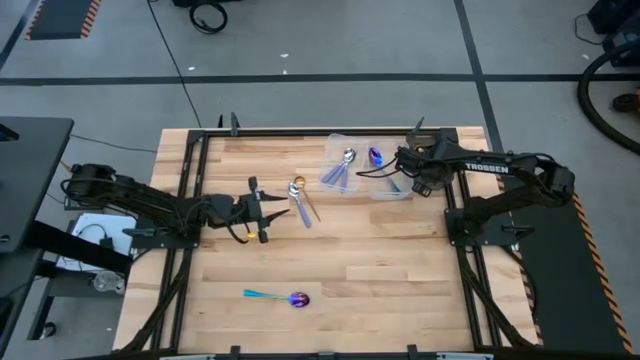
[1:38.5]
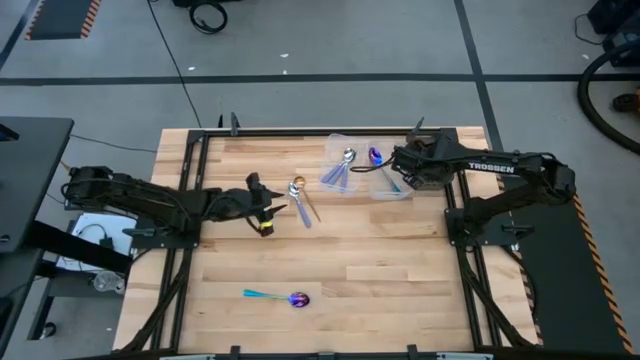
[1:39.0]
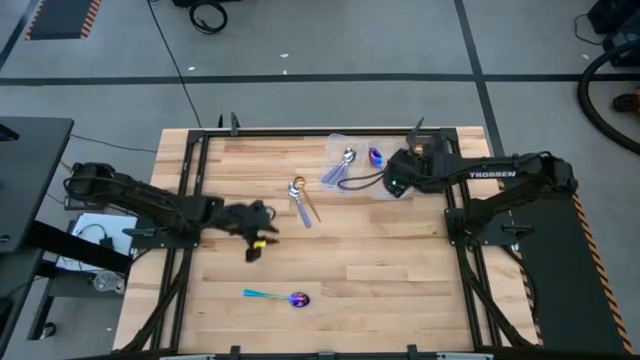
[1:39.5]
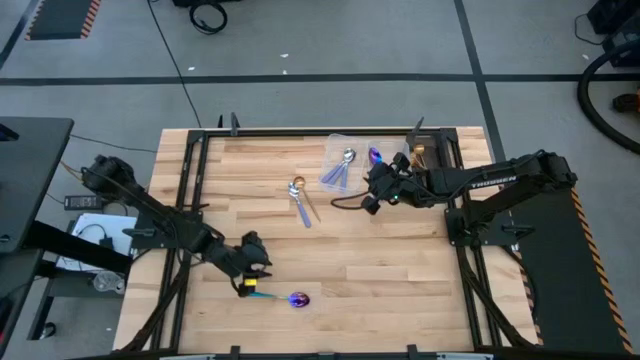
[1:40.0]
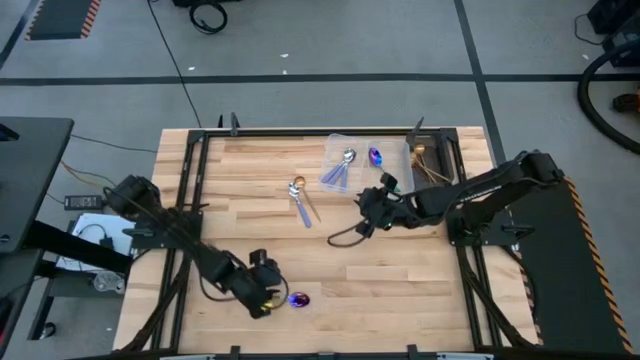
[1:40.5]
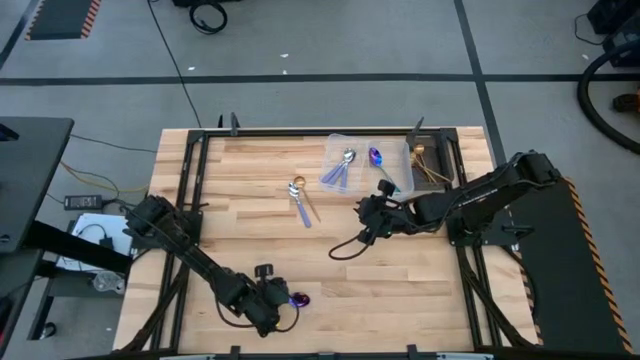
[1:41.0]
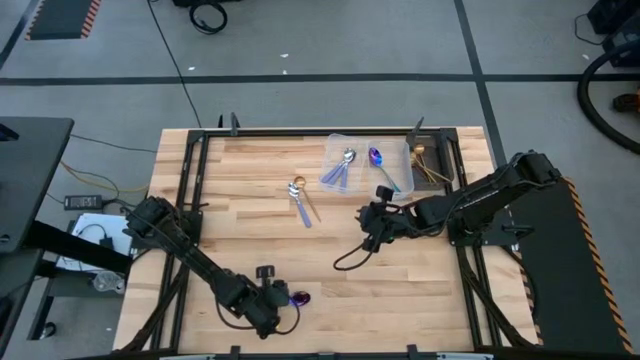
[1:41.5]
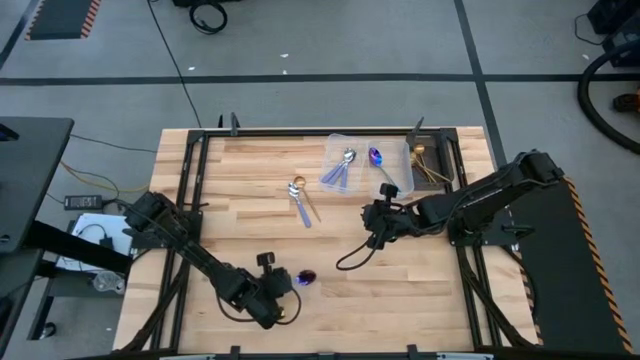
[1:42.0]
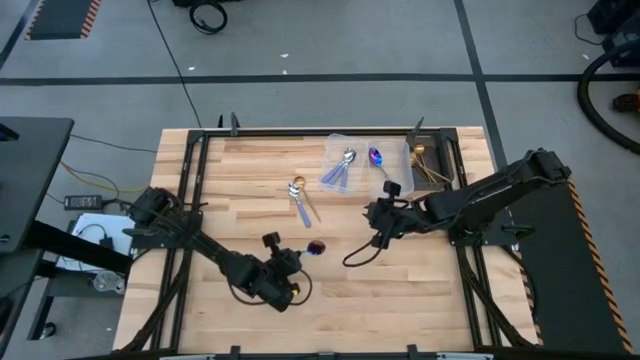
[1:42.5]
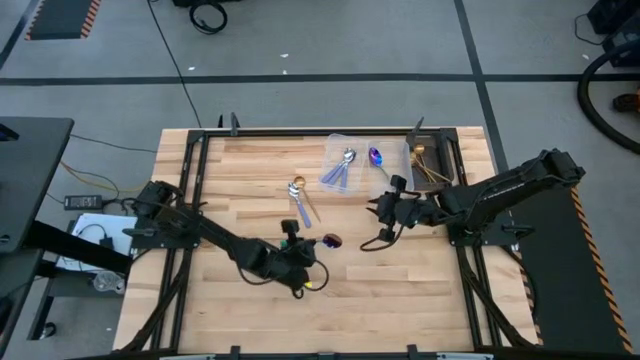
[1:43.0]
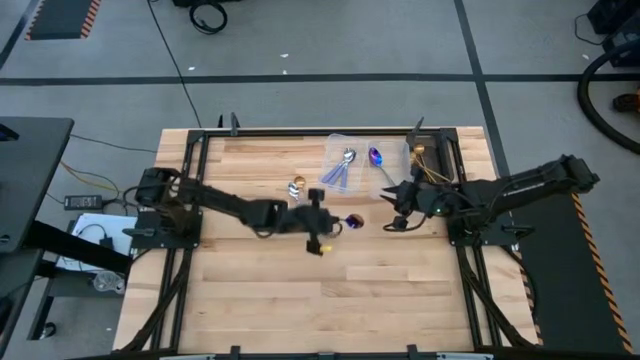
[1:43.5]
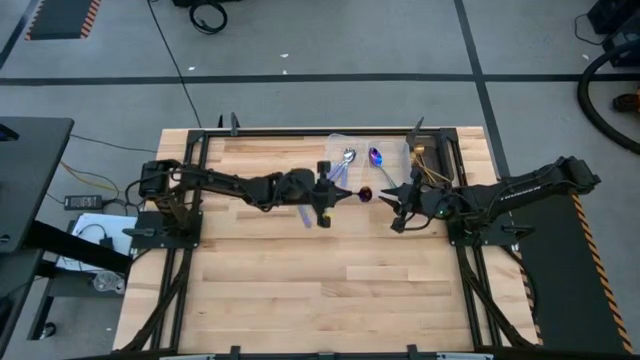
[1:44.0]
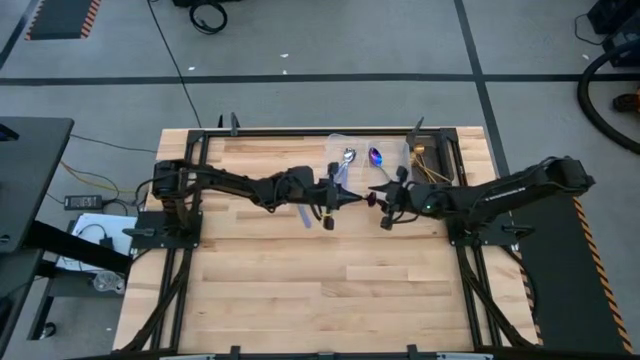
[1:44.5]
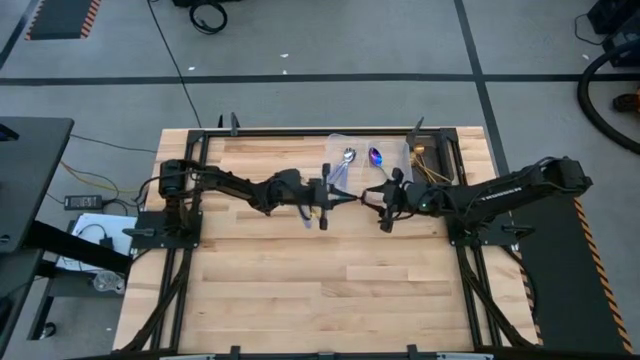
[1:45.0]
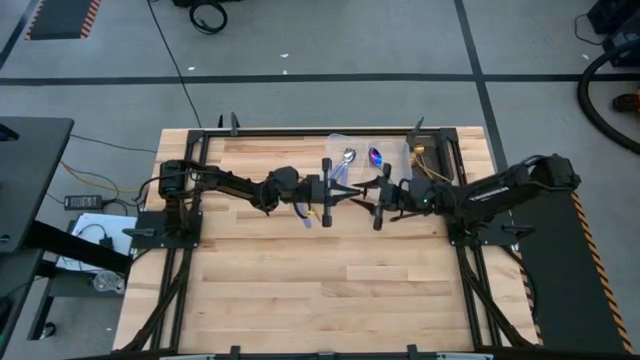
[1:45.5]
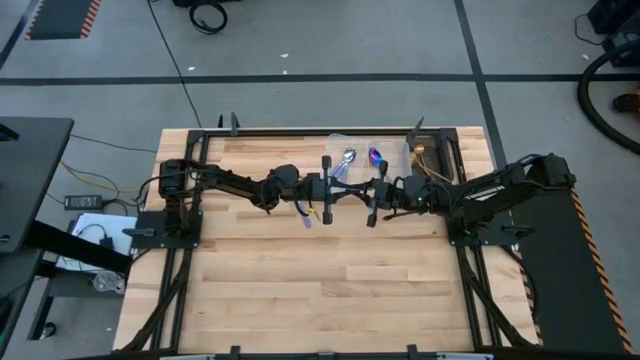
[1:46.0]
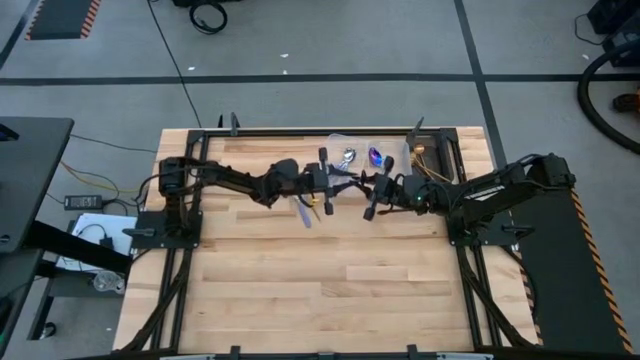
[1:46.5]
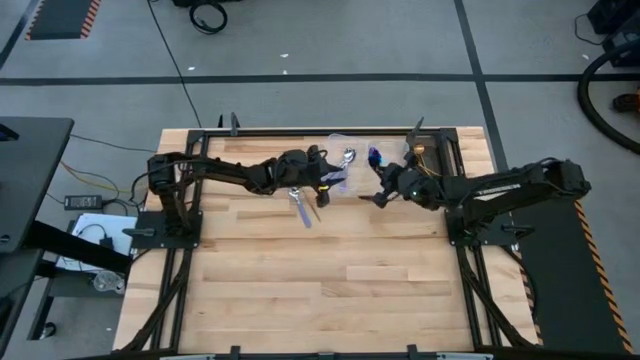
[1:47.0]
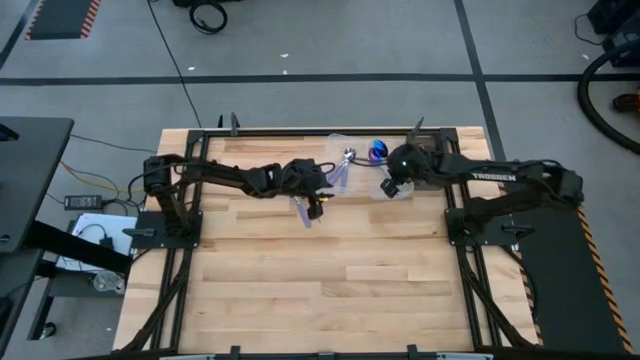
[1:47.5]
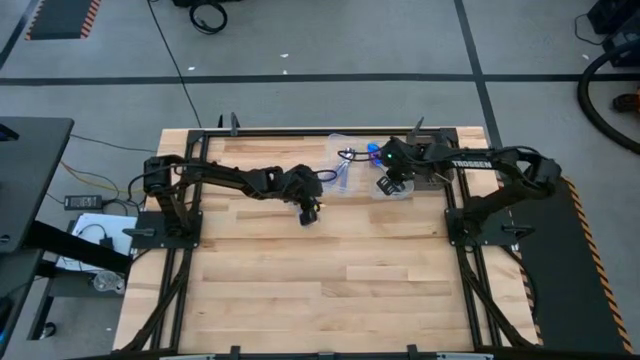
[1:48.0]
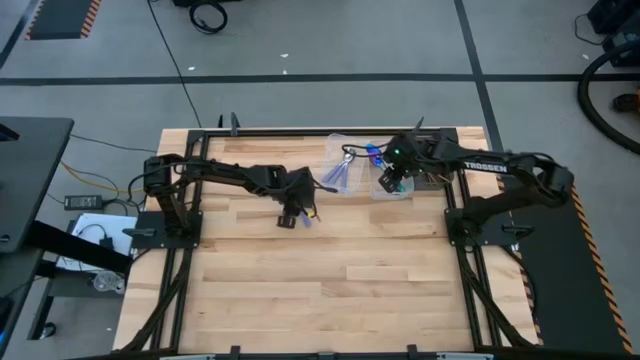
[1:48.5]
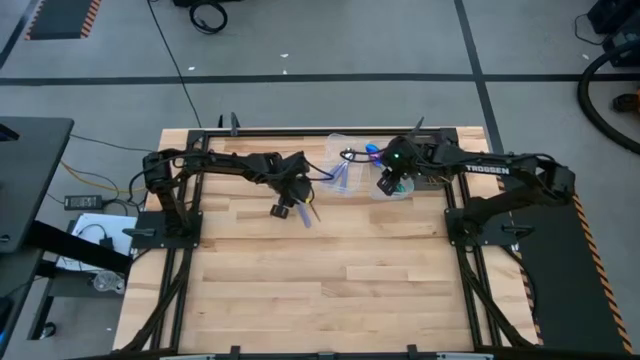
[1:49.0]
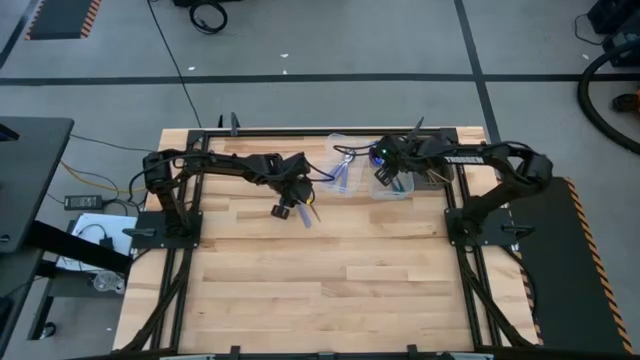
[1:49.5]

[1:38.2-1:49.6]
Task: Sort silverware by color (type)
Put the purple spoon into the right transparent bin

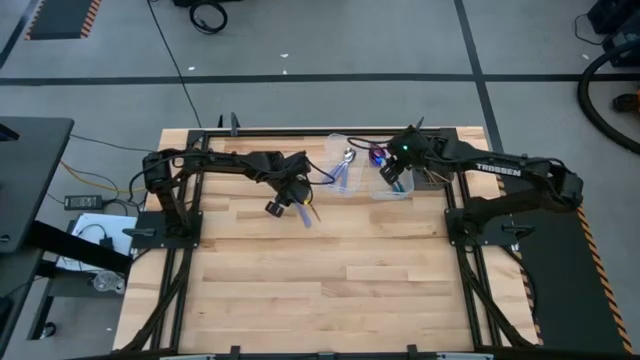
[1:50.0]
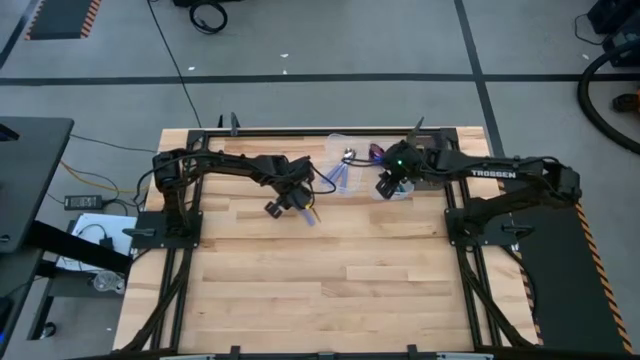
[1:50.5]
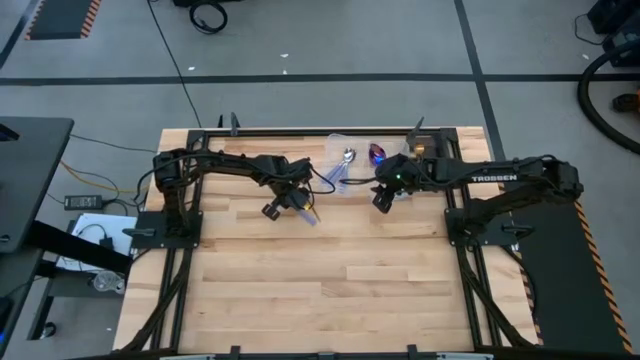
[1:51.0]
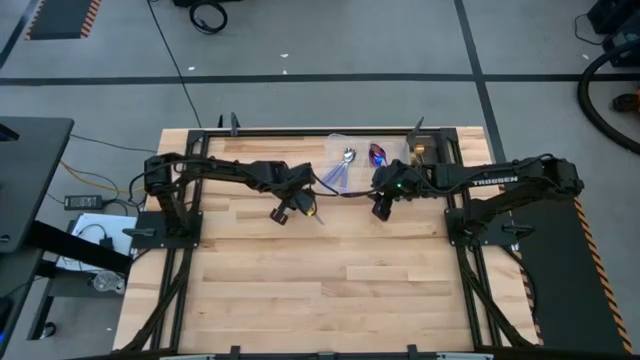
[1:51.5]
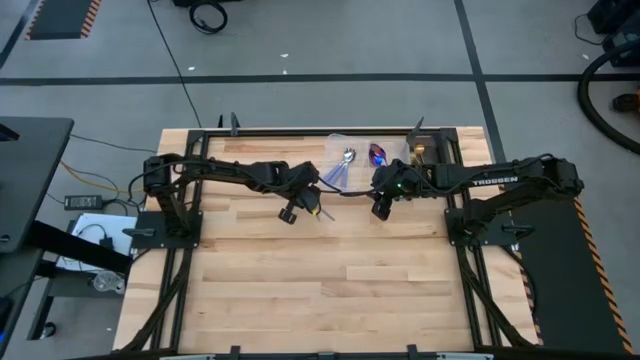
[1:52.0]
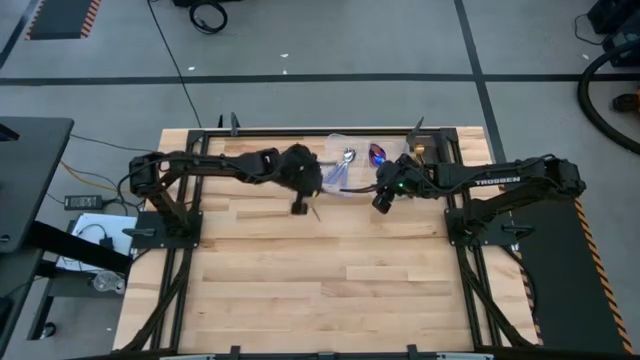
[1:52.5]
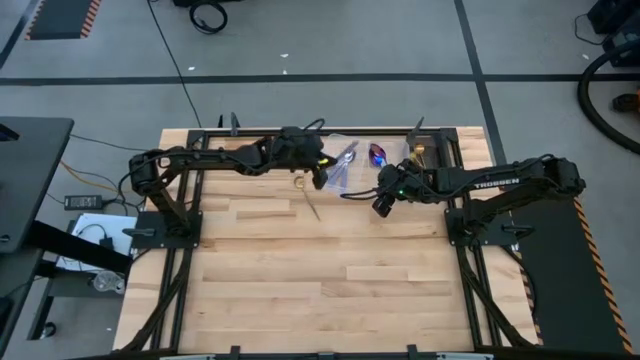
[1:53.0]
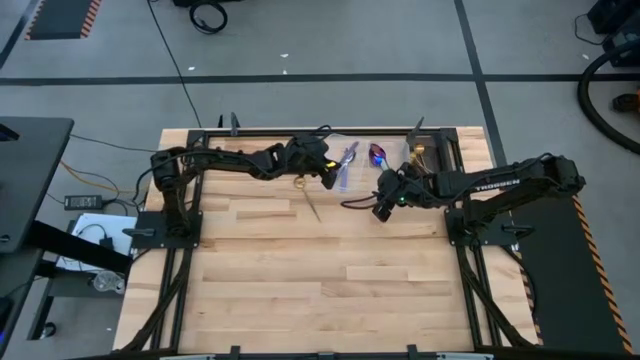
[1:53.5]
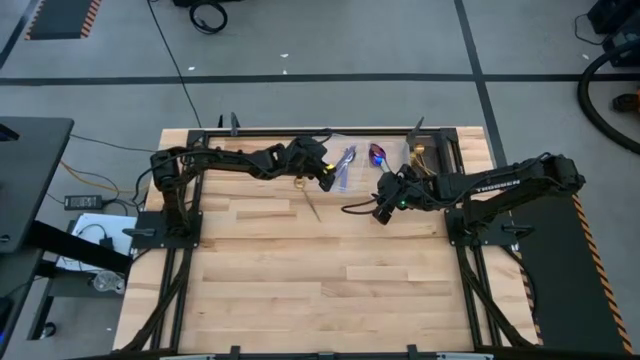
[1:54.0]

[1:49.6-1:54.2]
Put the gray spoon into the left transparent bin

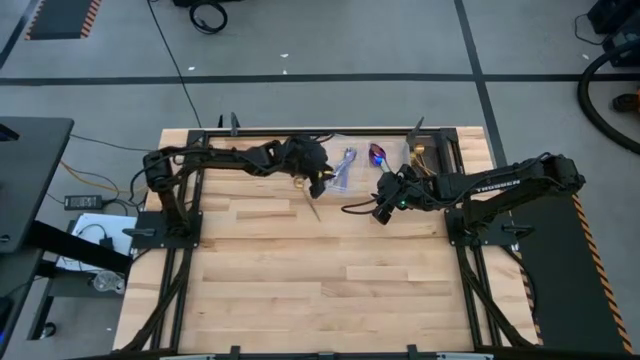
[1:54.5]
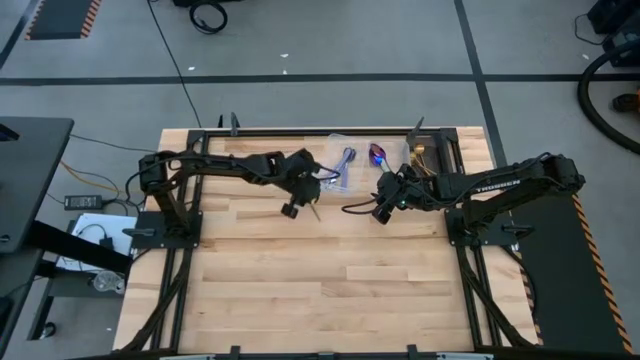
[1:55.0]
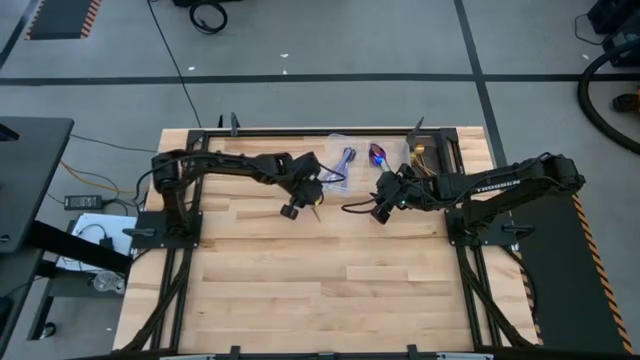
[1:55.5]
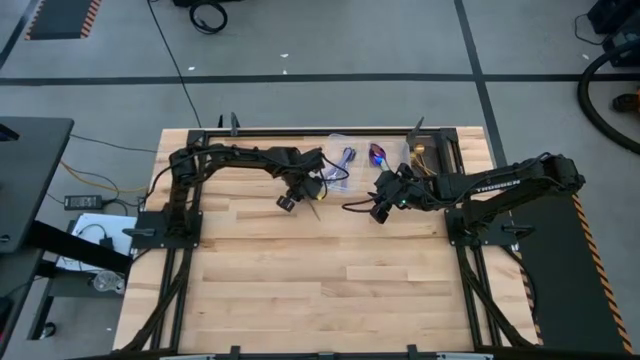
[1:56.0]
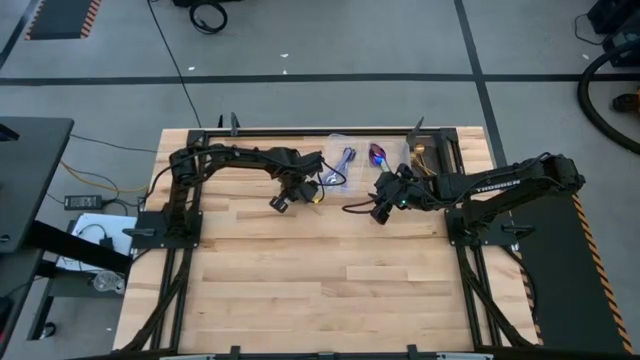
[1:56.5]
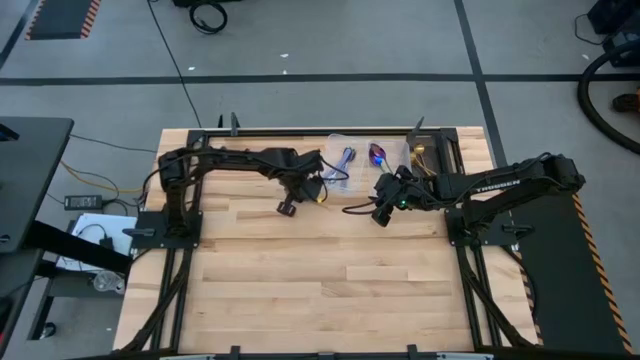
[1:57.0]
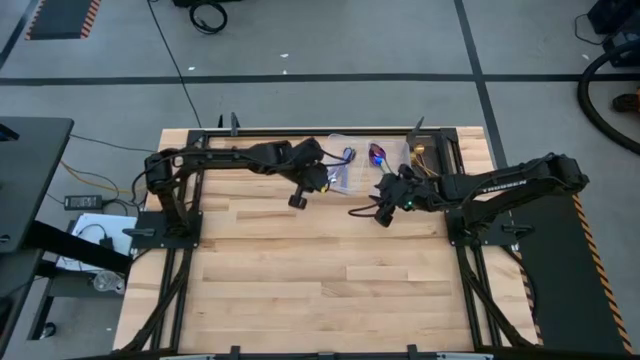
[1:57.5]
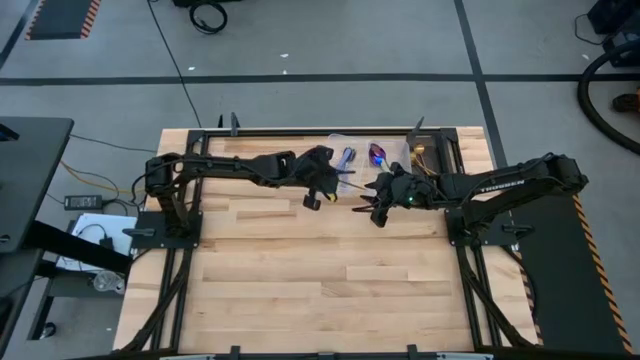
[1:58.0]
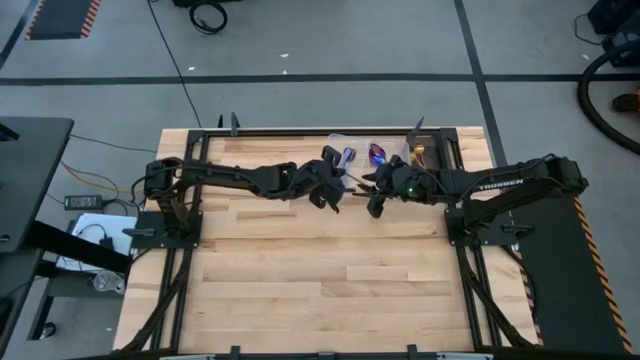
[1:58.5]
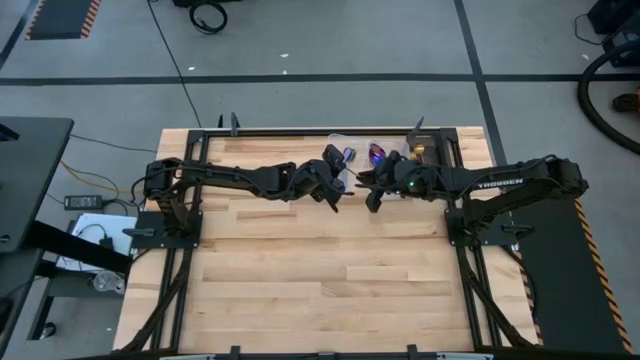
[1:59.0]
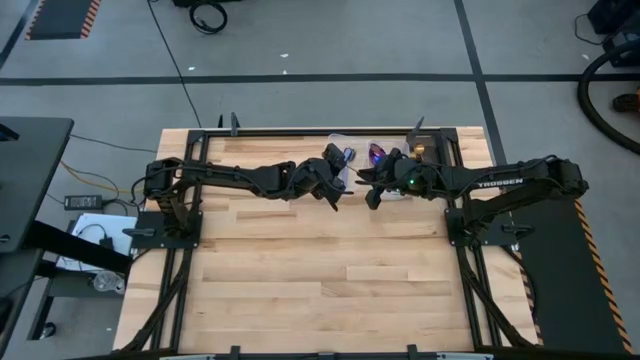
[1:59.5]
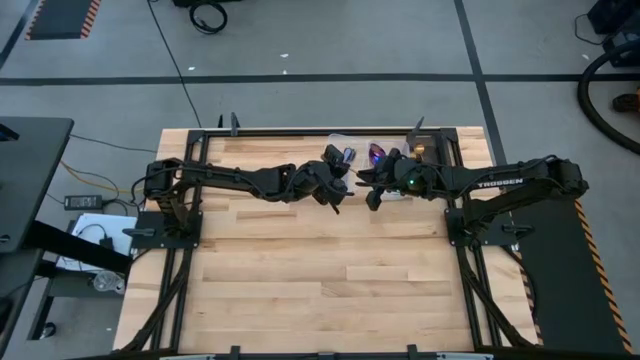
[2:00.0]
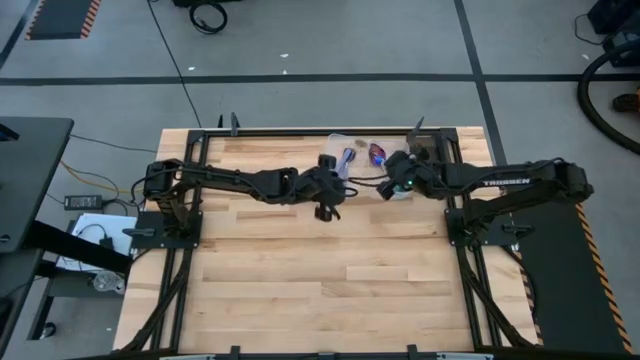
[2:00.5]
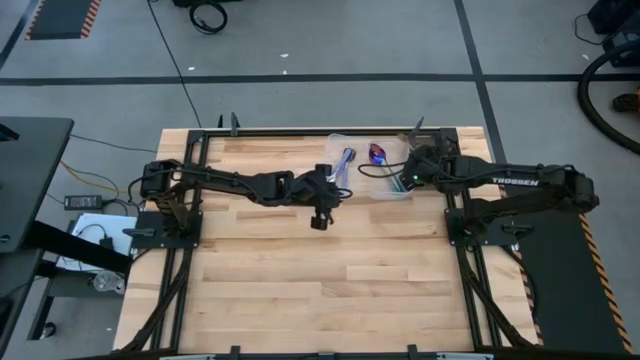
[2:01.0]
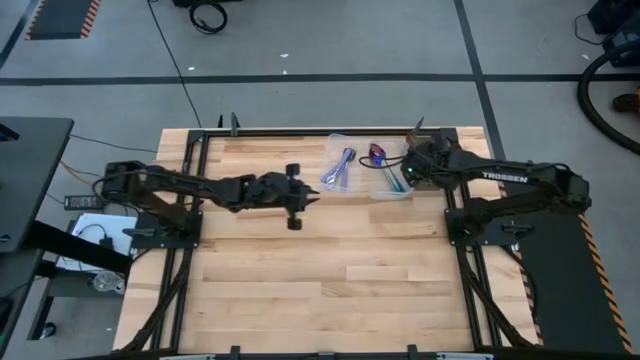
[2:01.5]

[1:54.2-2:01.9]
Put the golden spoon into the black bin
